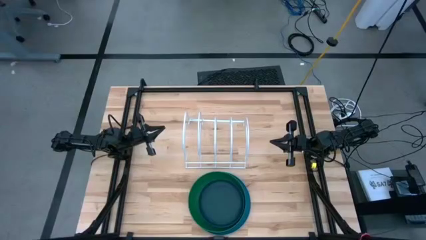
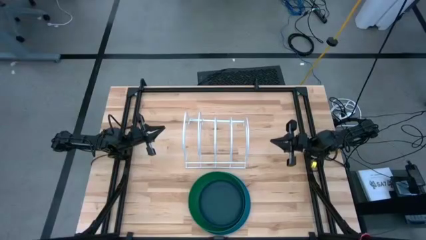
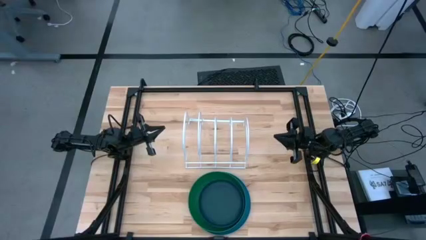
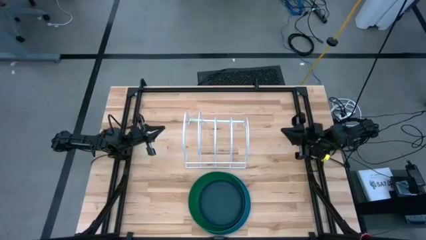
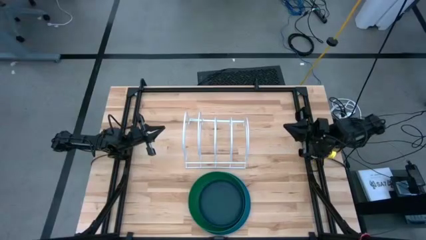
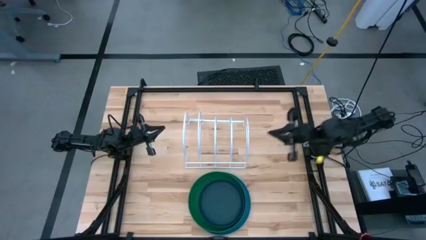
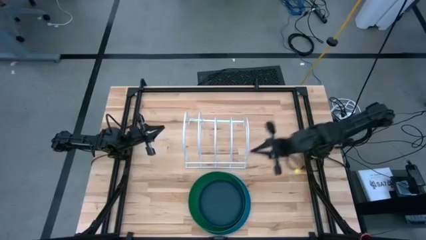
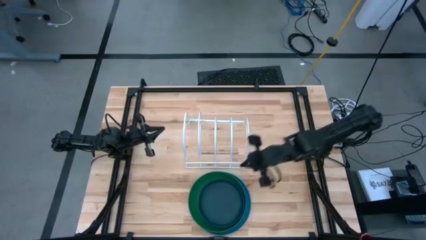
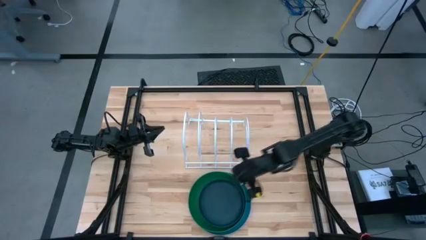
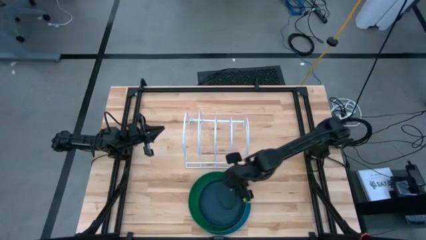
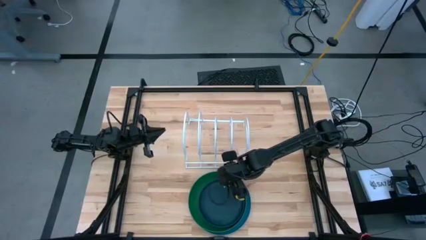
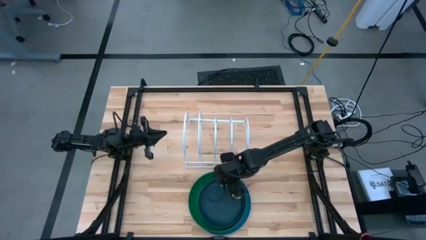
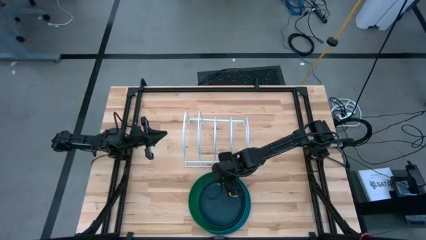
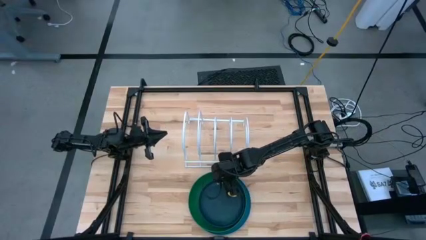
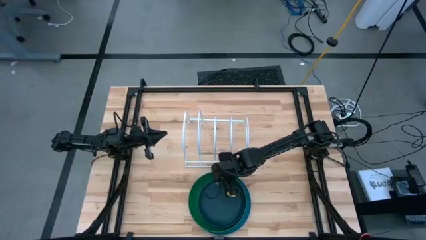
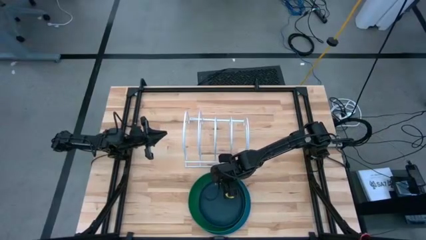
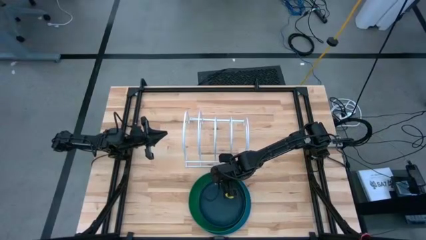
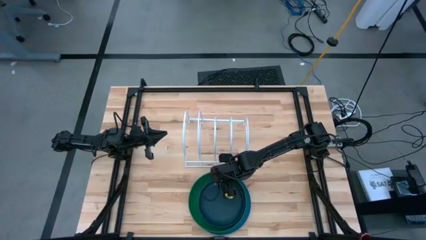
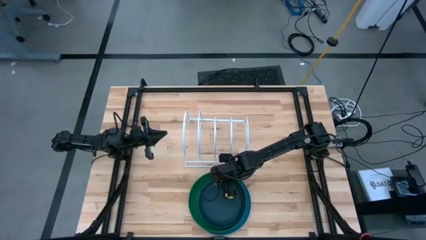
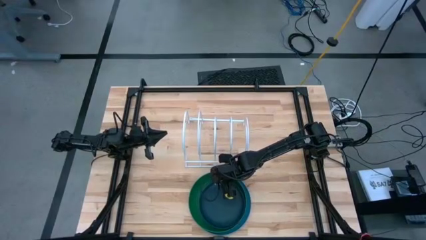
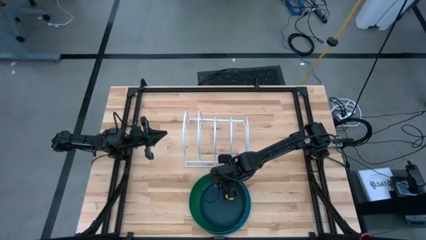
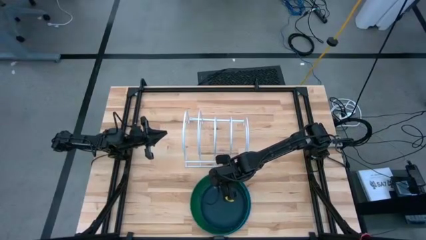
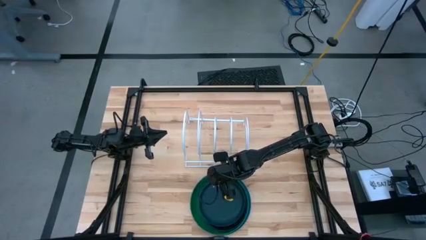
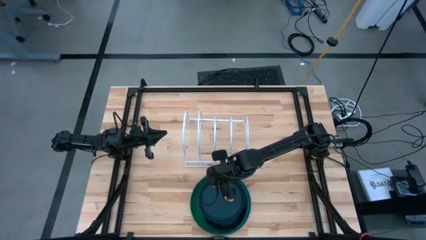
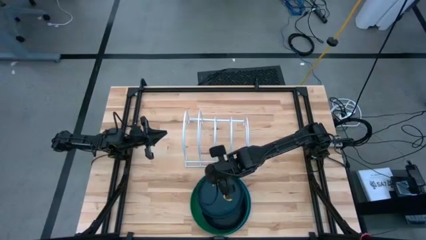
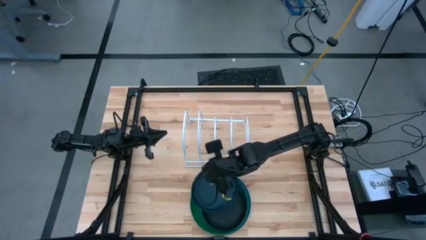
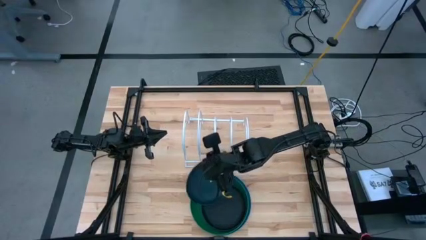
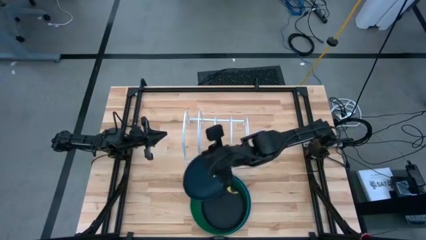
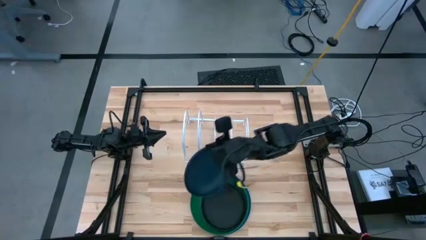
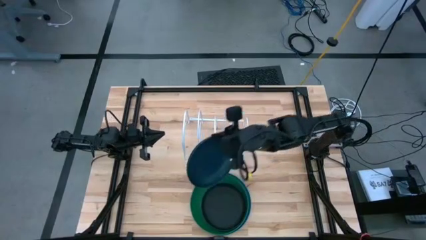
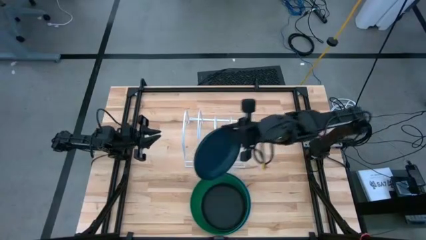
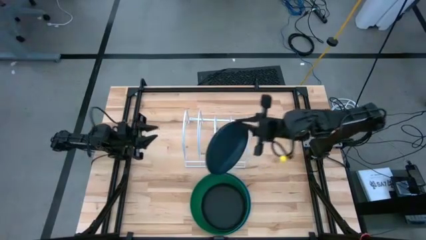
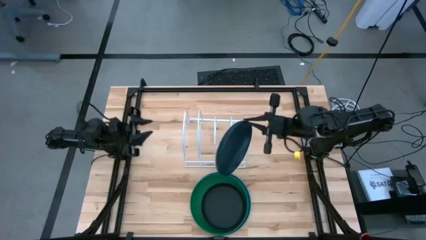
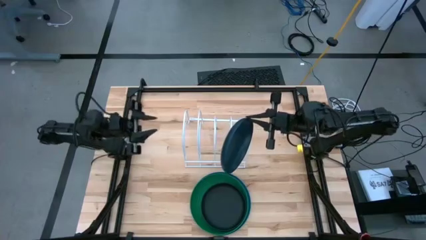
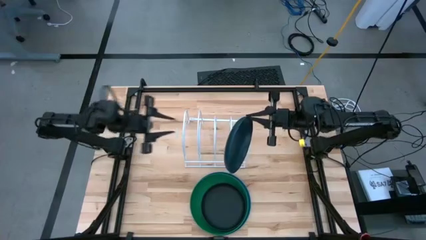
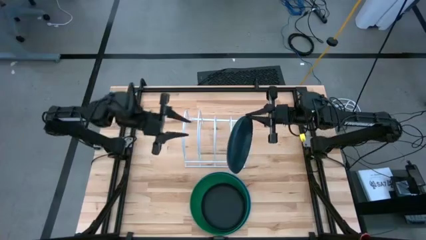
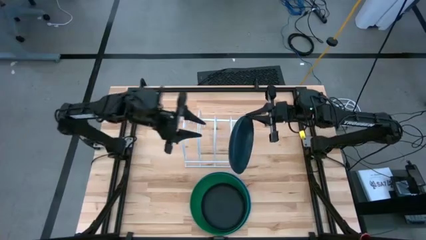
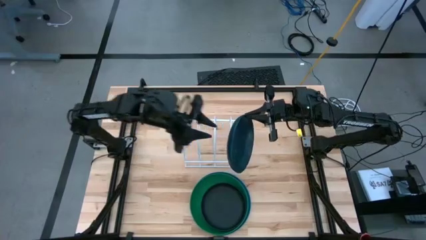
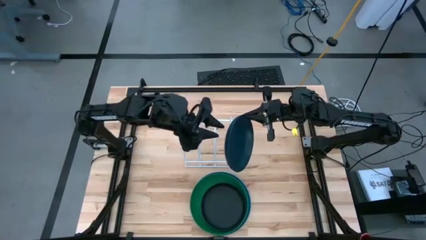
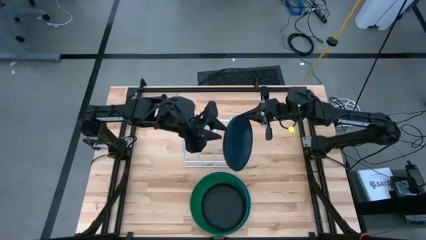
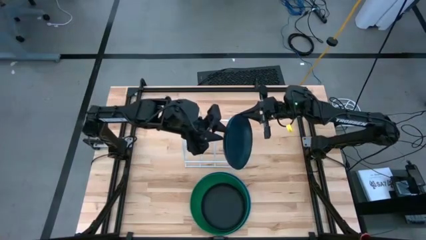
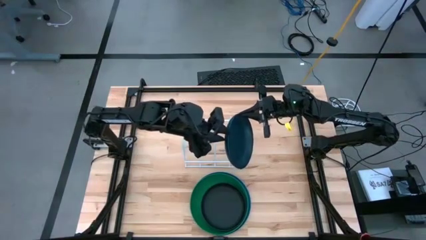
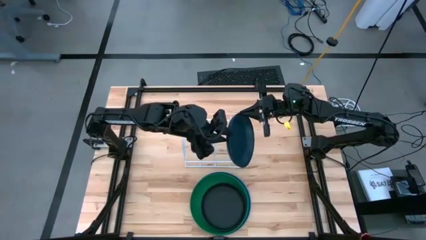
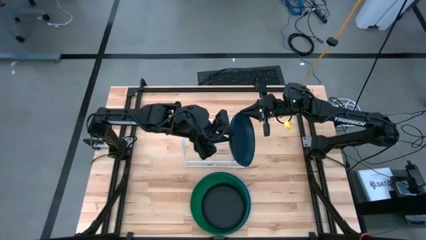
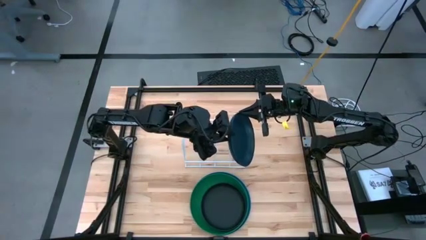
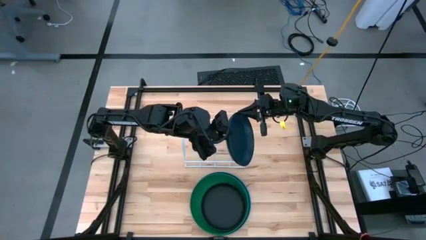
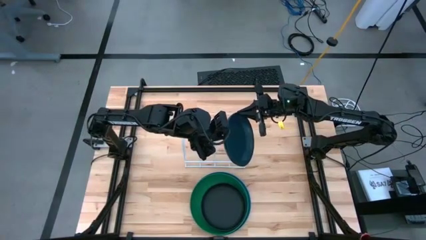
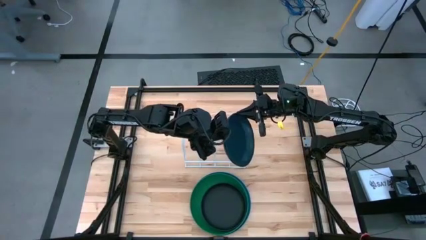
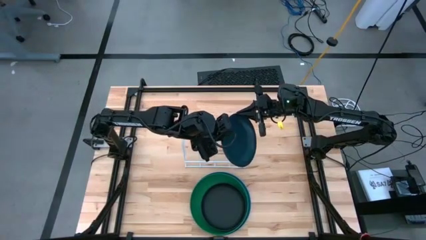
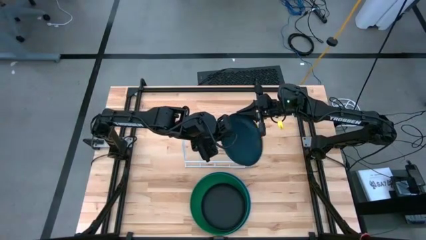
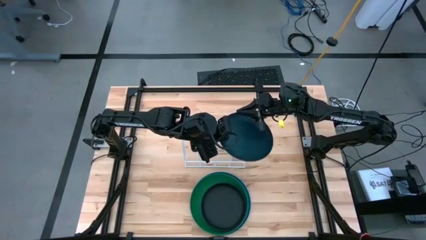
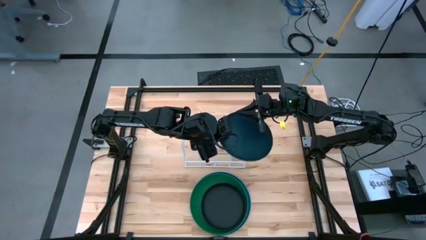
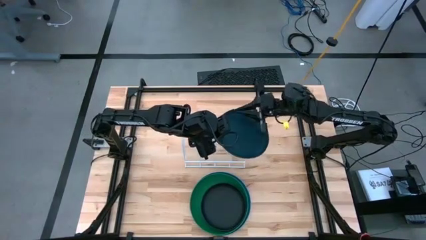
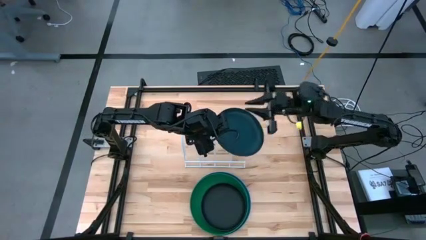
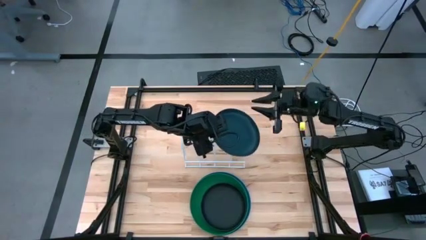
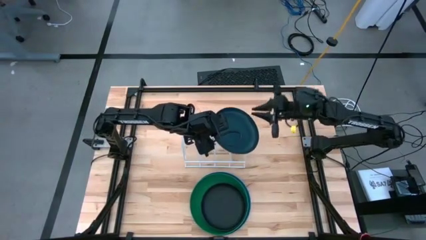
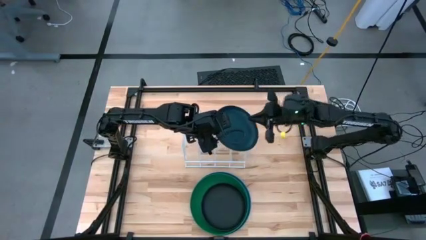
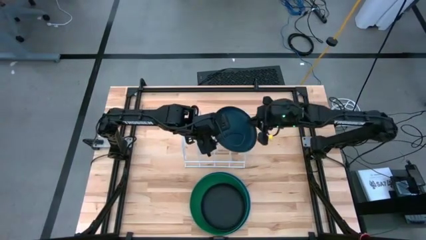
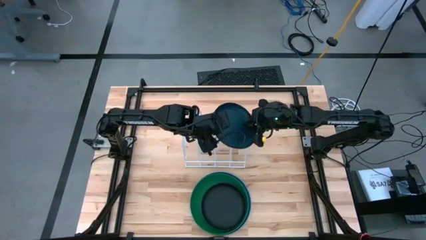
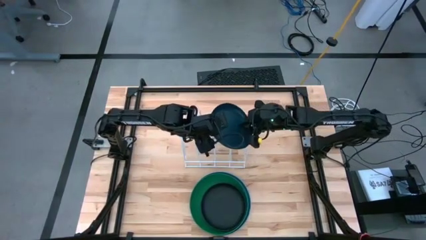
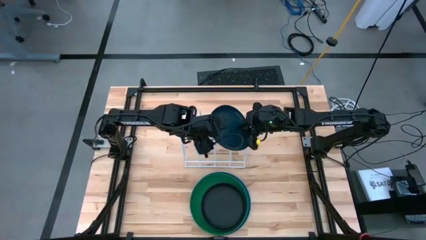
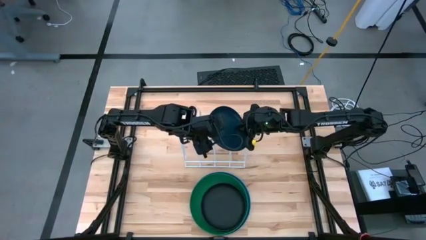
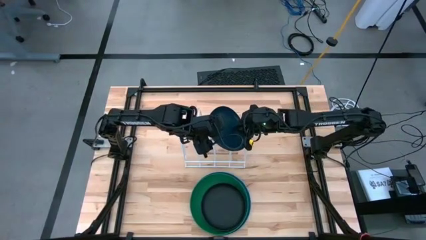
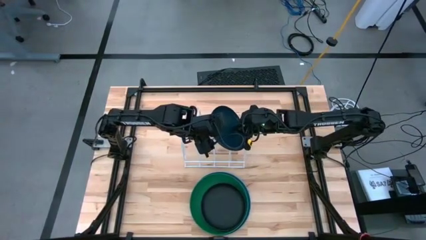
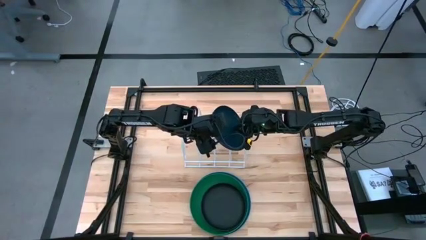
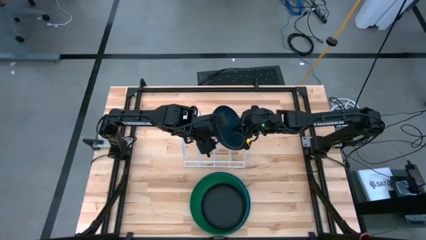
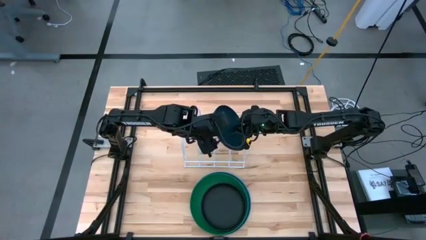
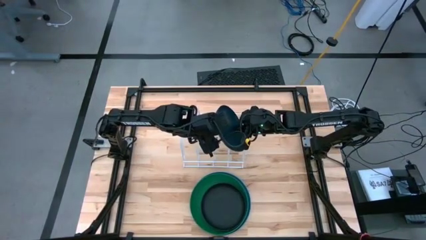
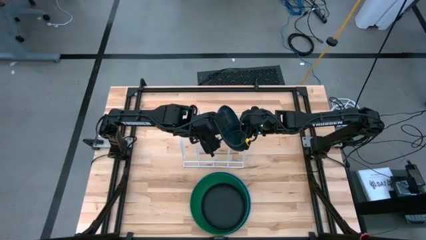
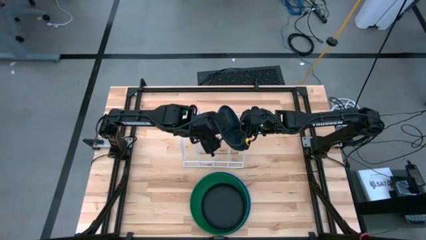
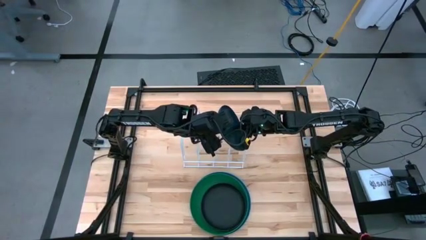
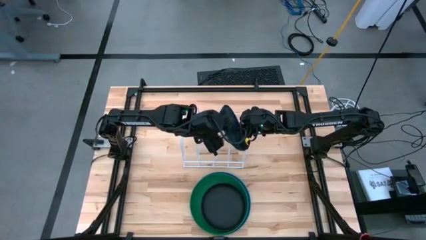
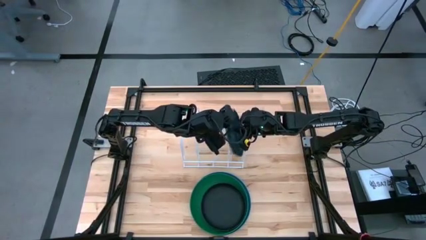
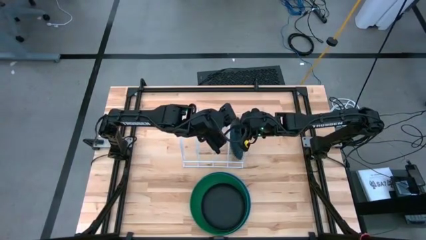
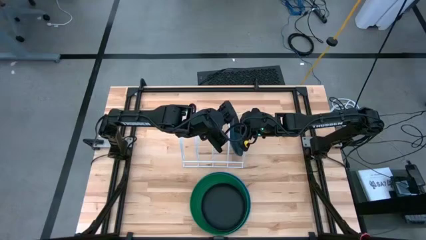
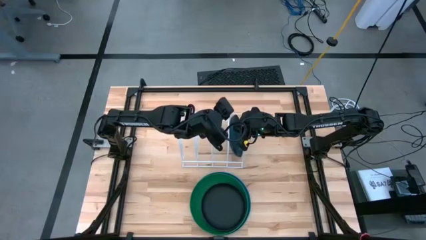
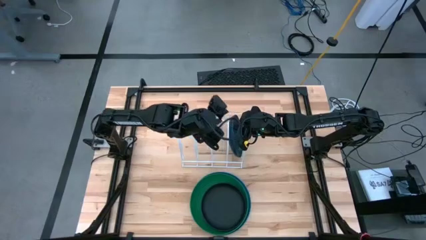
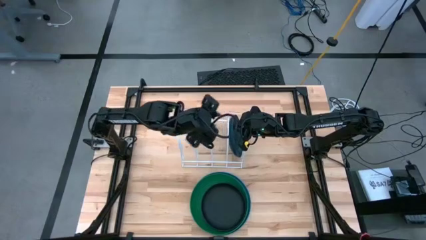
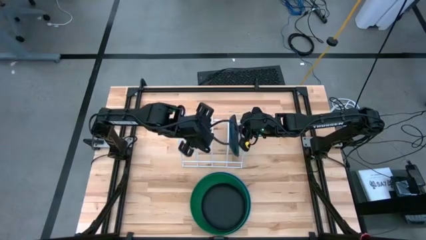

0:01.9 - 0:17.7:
Task: Sort dishes
Put the dark blue plate into the dish rack
